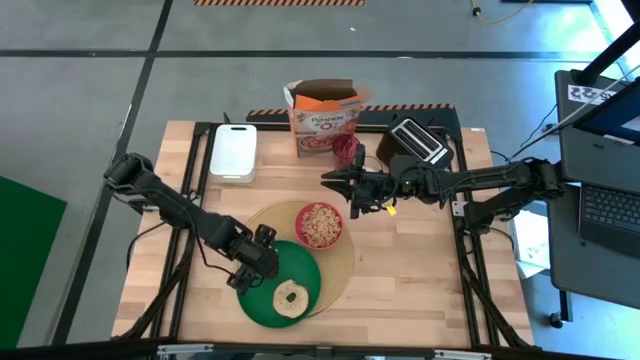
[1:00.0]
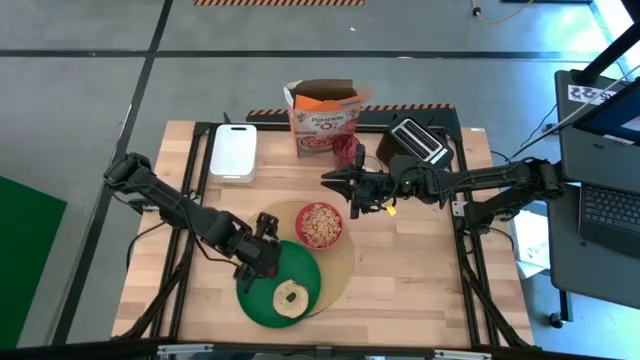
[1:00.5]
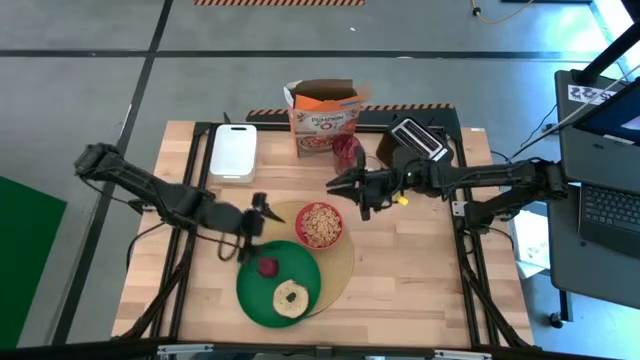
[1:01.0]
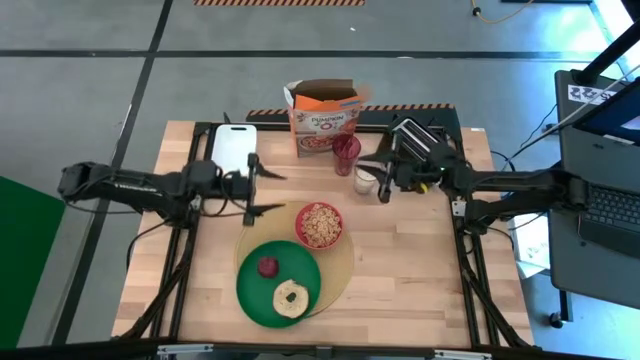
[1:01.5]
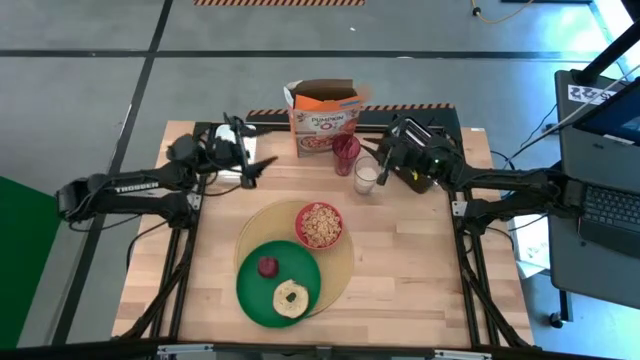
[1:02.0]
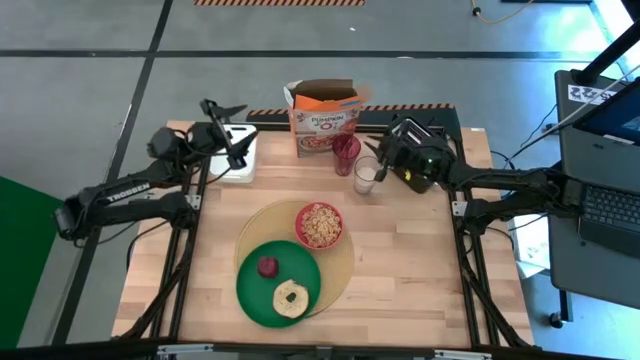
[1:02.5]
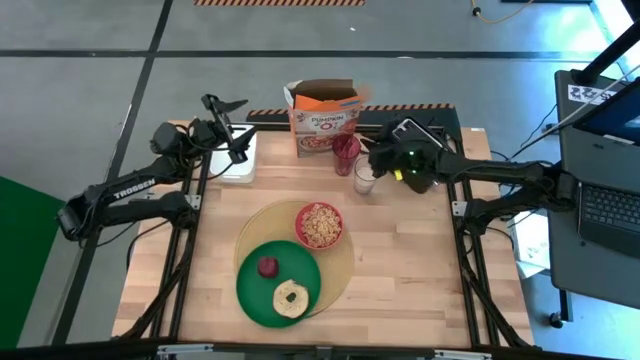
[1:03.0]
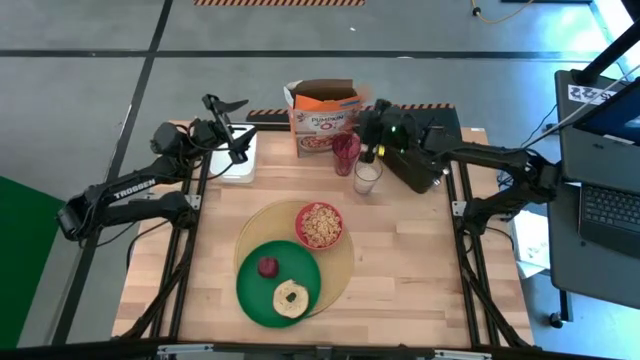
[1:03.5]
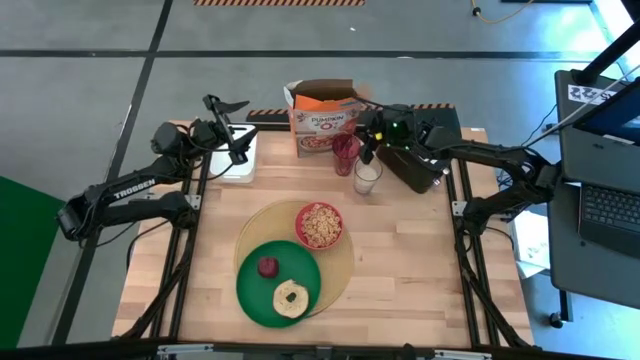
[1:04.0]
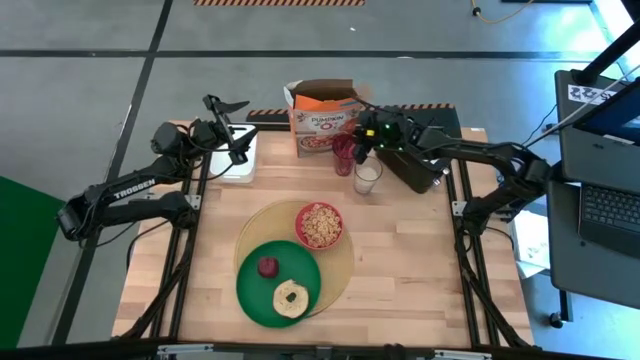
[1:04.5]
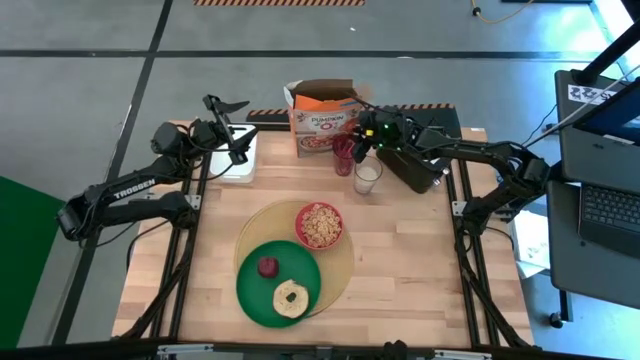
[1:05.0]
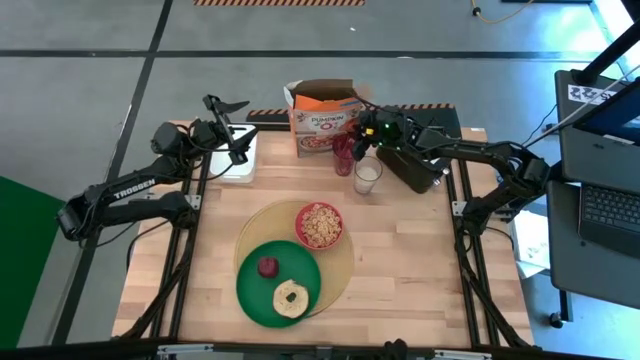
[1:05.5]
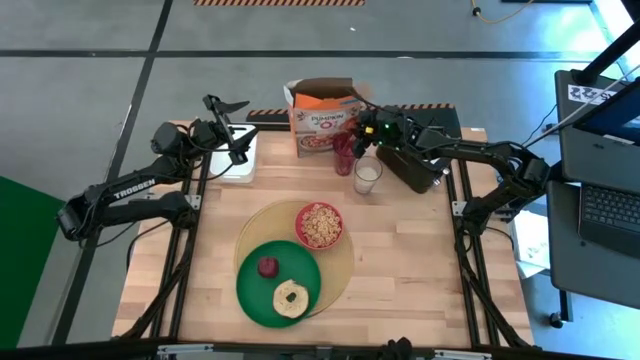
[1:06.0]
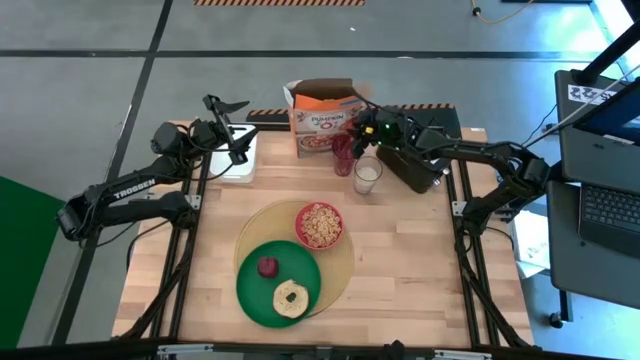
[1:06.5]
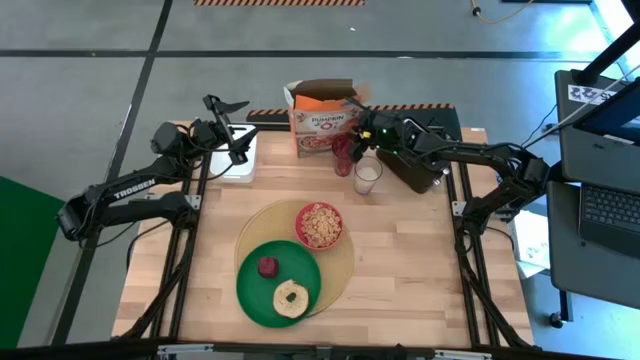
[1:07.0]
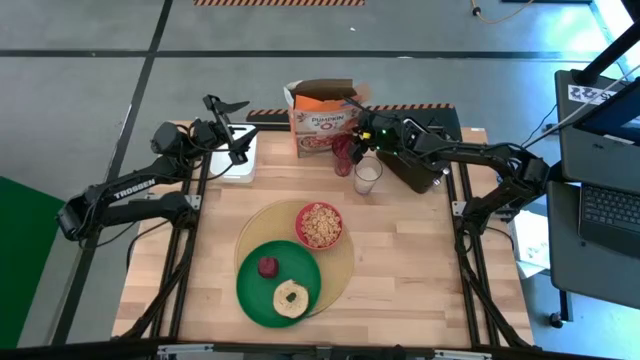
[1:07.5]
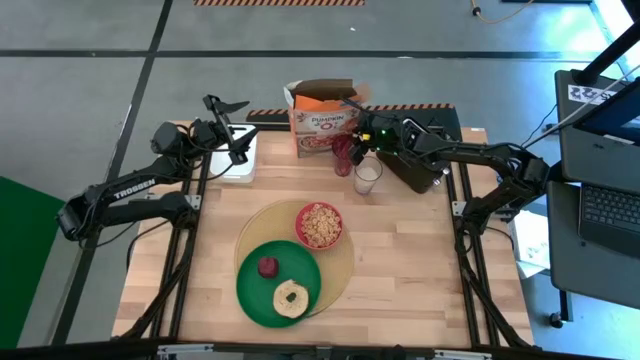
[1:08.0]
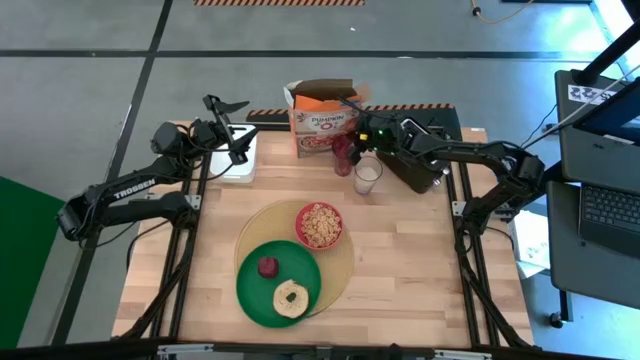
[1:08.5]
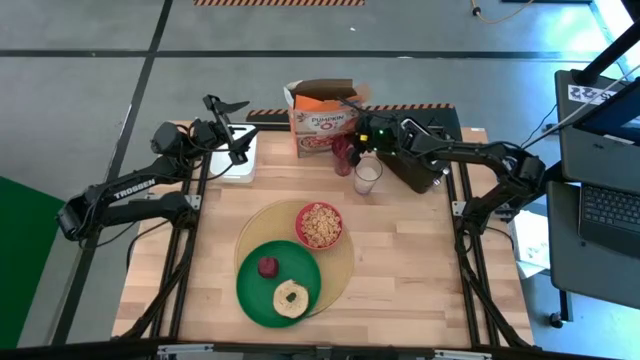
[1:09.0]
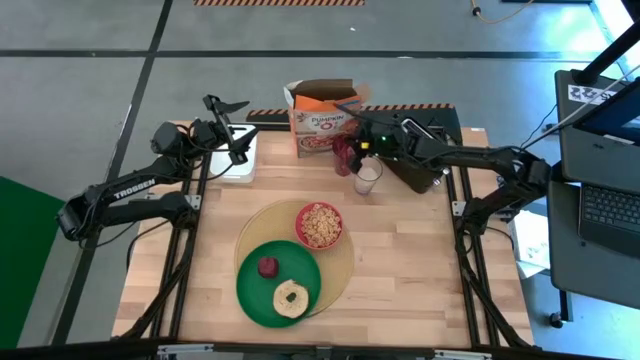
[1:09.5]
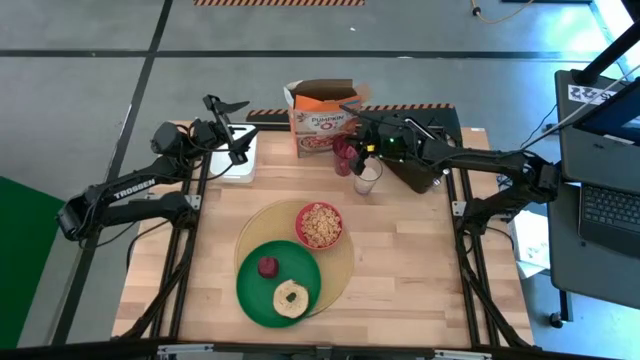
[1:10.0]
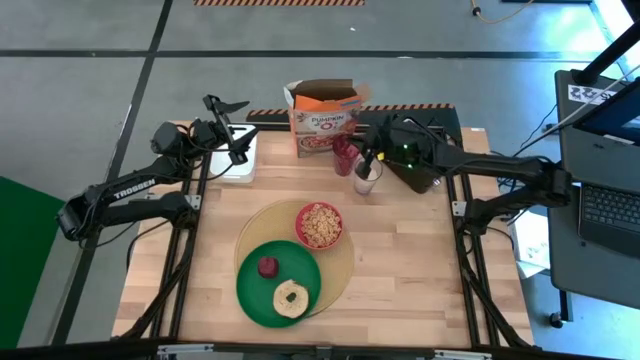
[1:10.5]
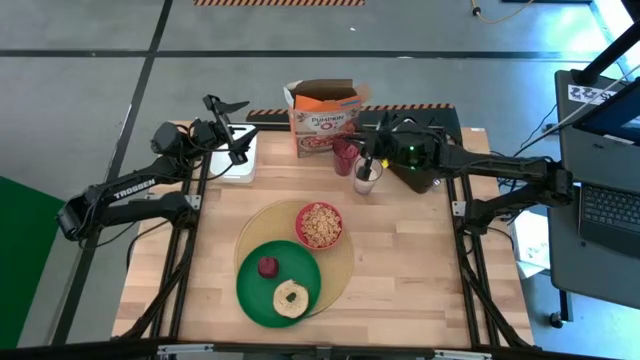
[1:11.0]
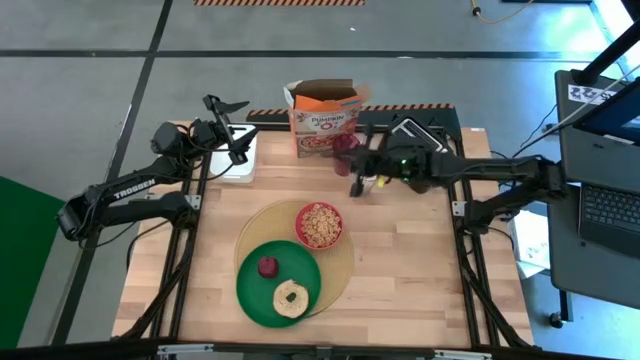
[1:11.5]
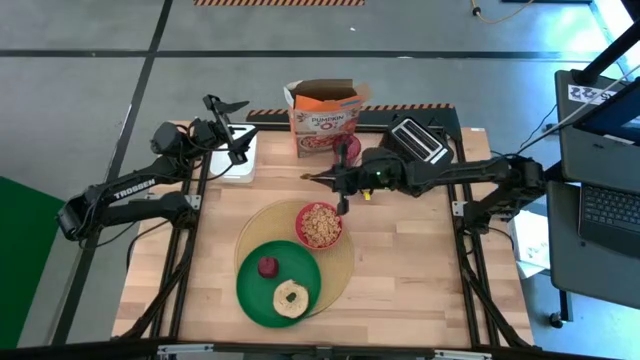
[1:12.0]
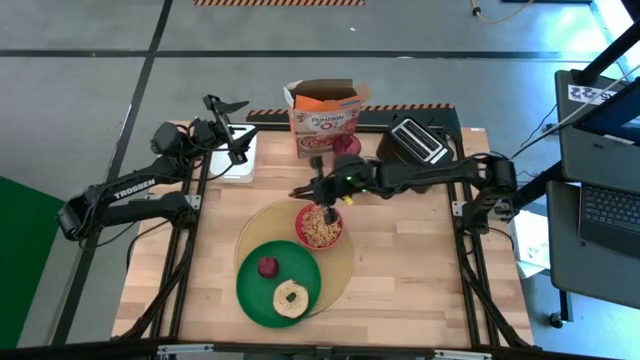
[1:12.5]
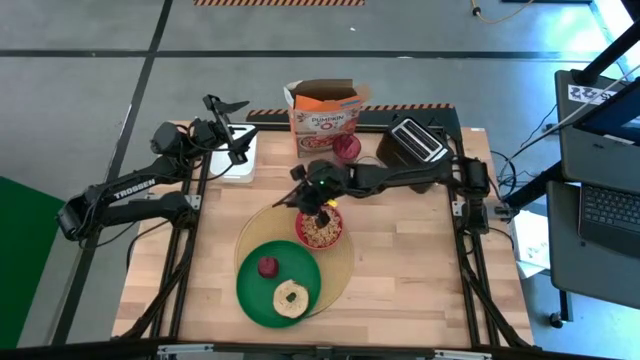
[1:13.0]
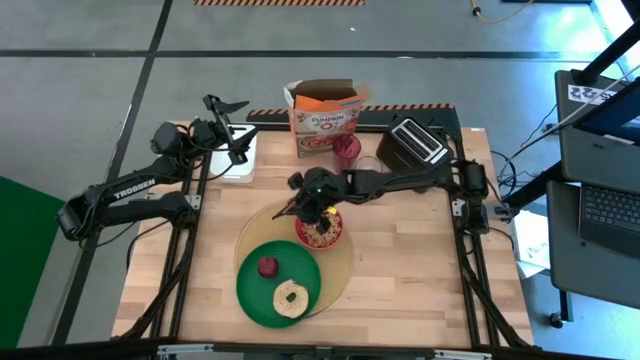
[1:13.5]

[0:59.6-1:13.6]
Task: Arrange a breakfast setting
Put the spoon on the brown table mat

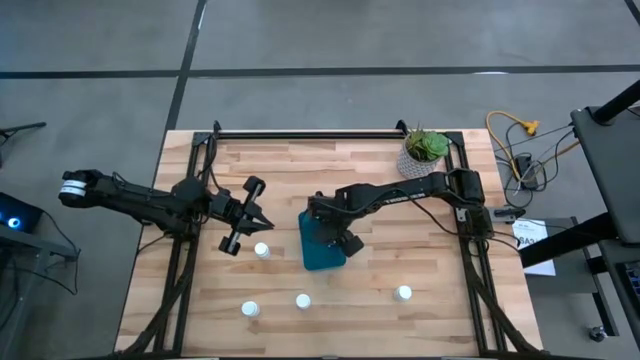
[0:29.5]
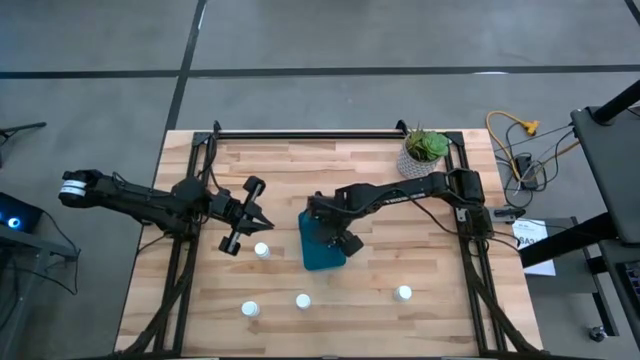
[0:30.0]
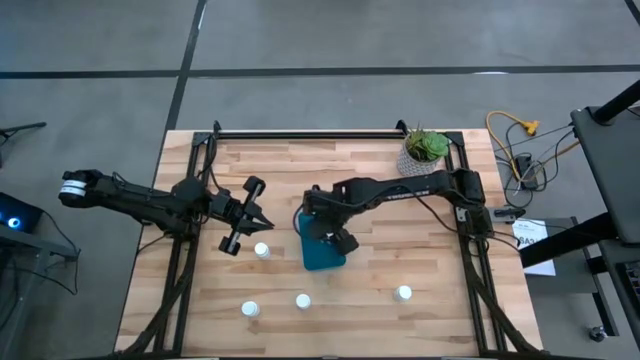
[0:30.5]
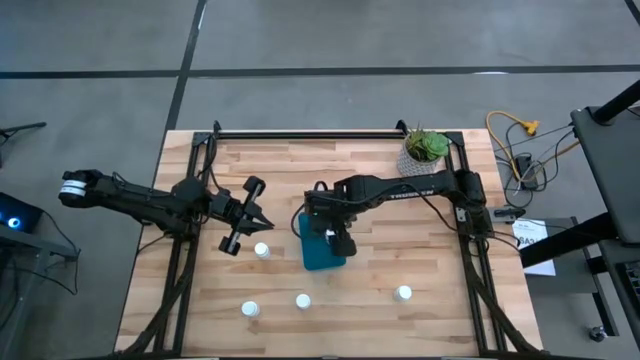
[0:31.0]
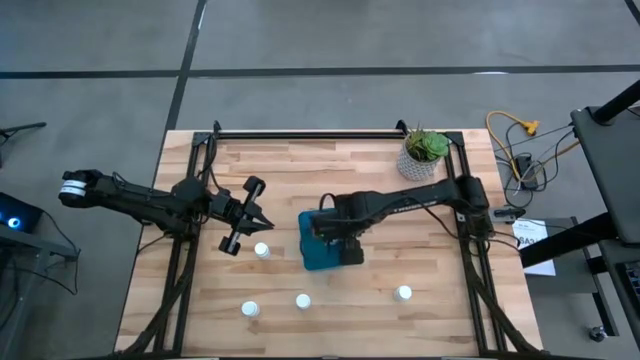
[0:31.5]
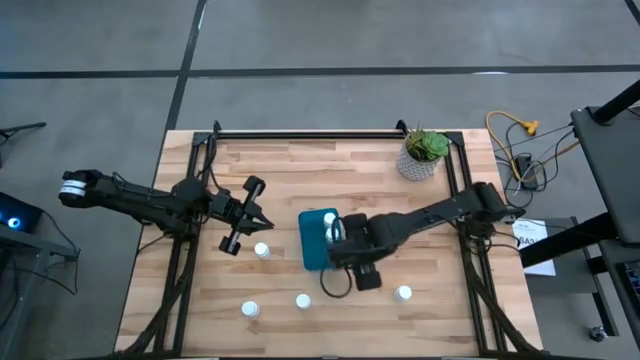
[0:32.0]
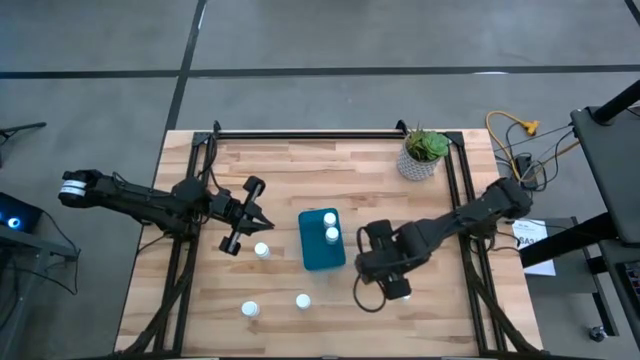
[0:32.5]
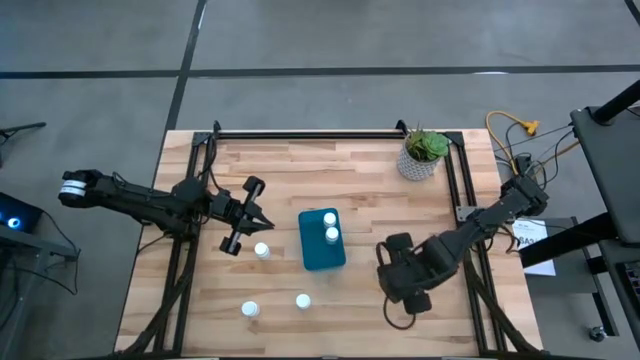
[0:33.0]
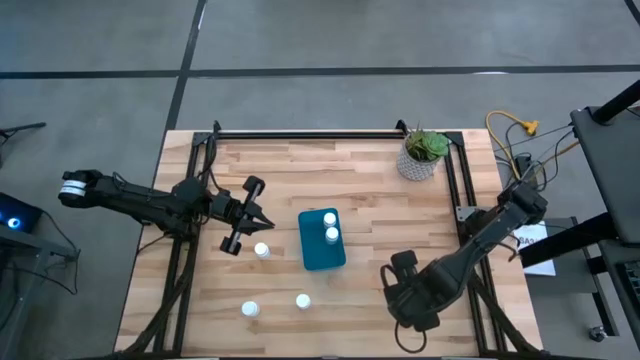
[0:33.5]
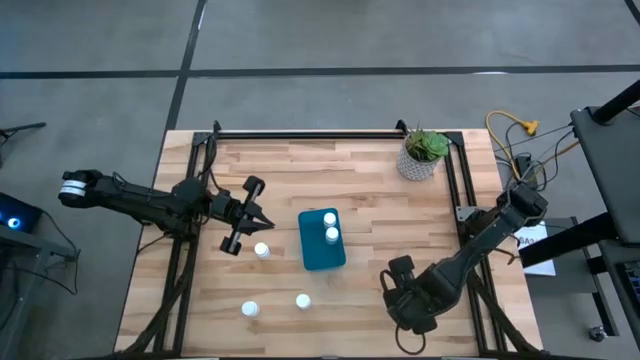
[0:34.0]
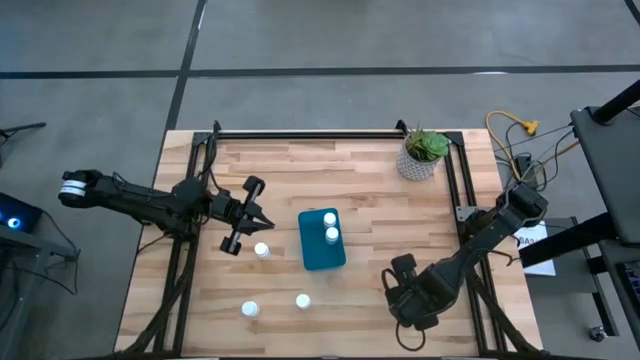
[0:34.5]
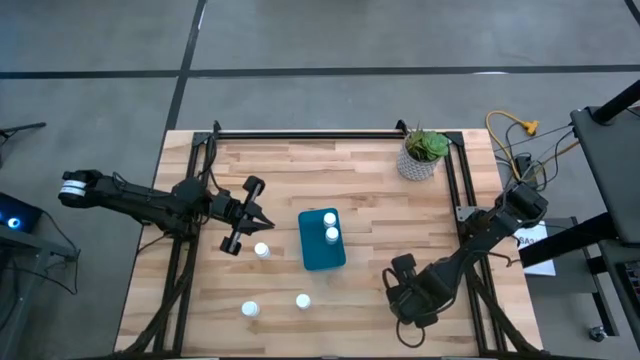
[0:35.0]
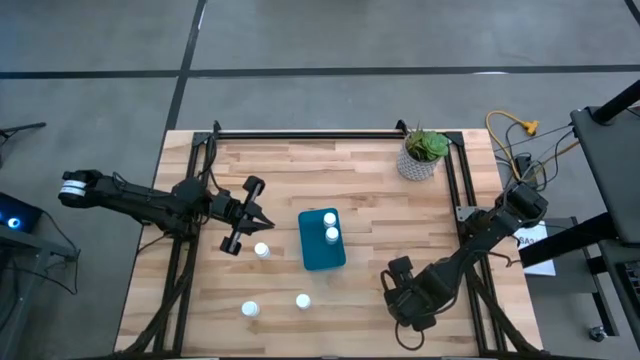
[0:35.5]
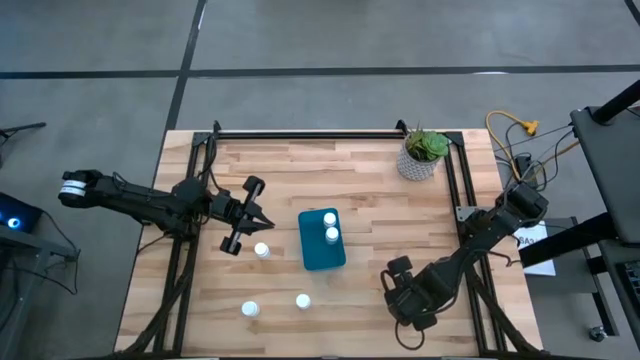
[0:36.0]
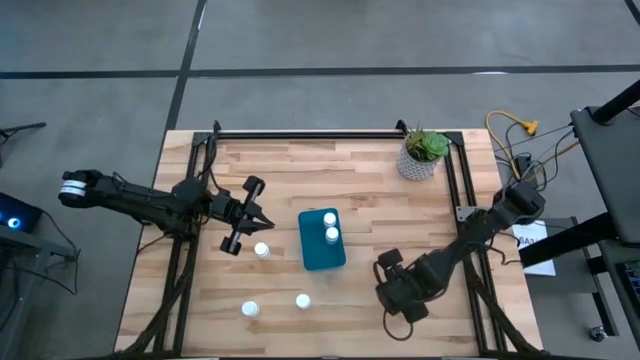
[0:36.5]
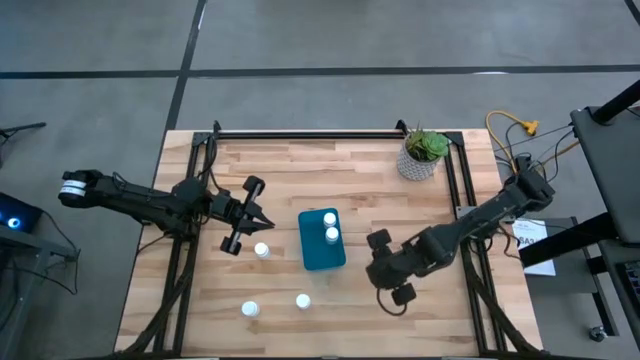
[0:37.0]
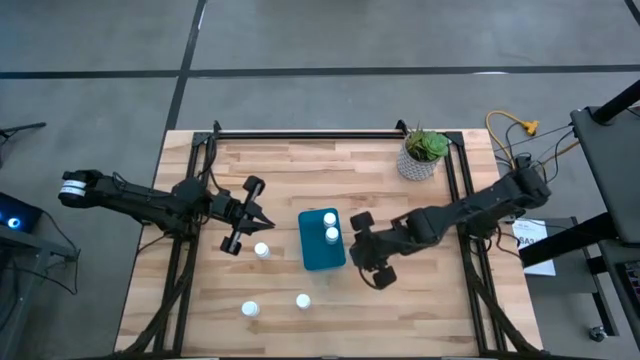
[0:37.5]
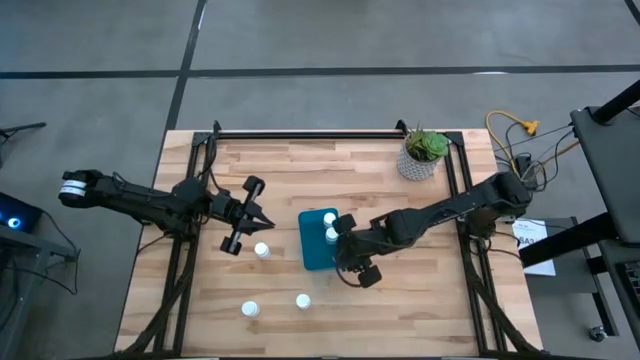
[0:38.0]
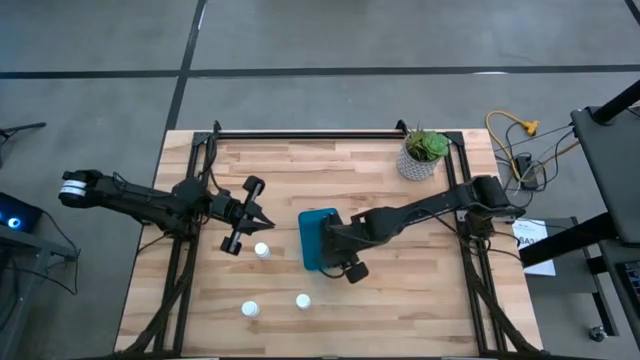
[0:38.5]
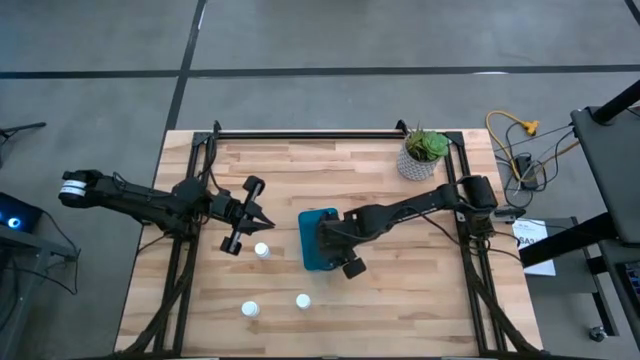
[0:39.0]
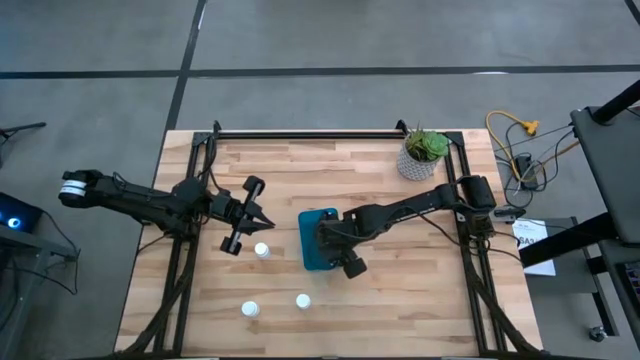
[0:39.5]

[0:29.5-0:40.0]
Task: Pick and place pill bottles into a basket
Put the white pill bottle into the blue bin
